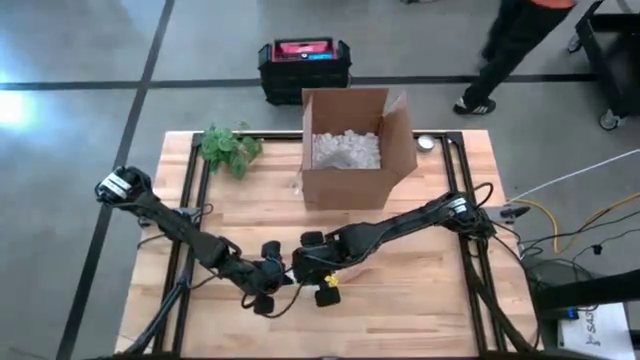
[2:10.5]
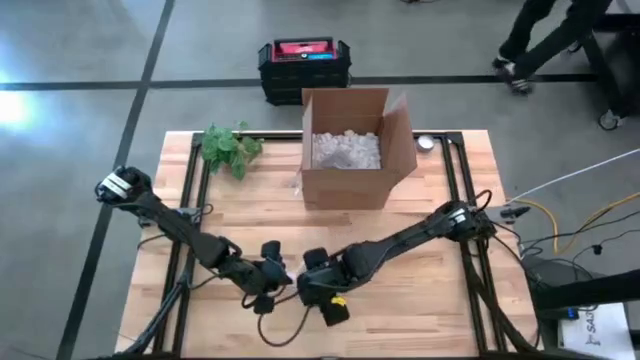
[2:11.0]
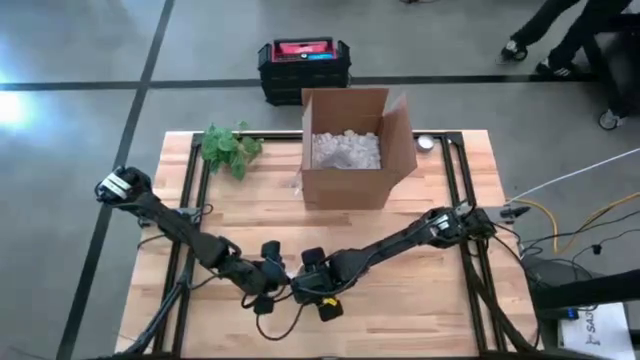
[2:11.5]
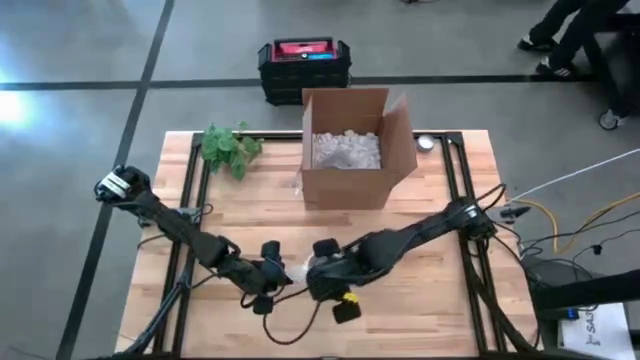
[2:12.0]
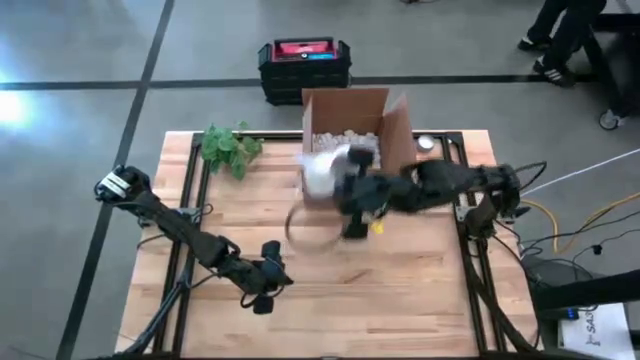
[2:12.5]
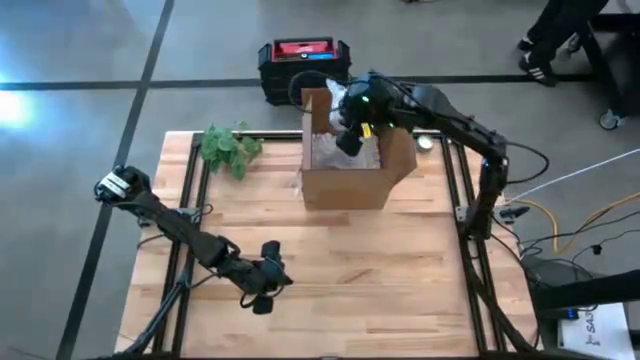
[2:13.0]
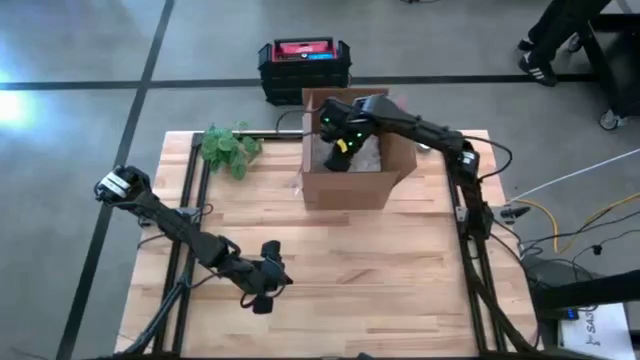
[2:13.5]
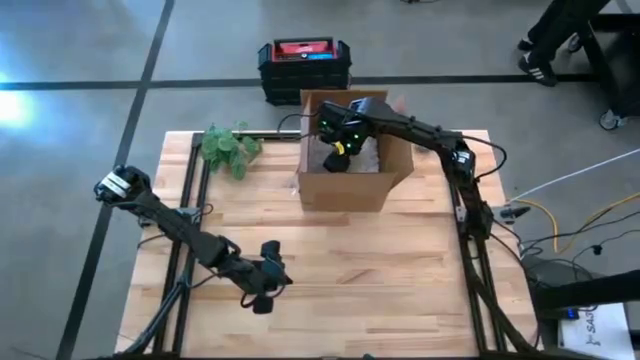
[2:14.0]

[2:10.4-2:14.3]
Task: wrap mug
Put the wrapped yellow mug into the box

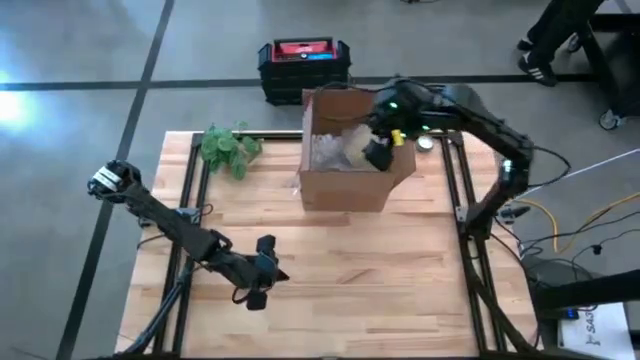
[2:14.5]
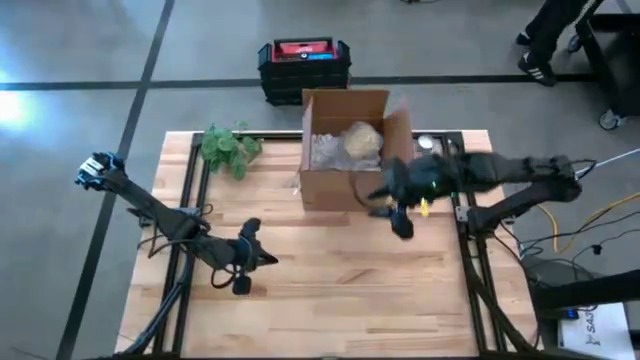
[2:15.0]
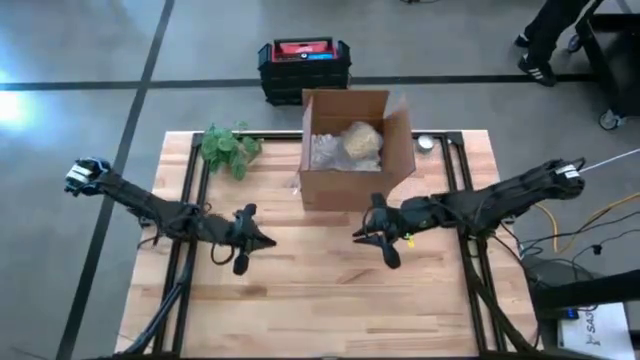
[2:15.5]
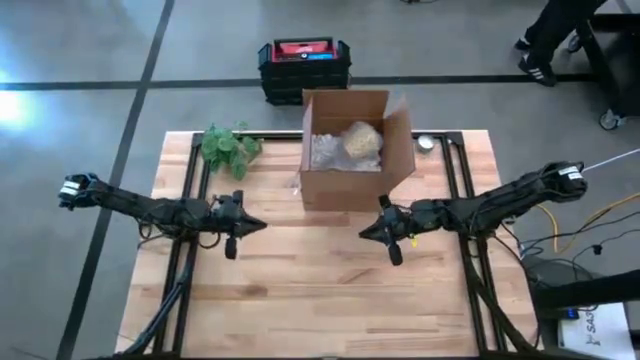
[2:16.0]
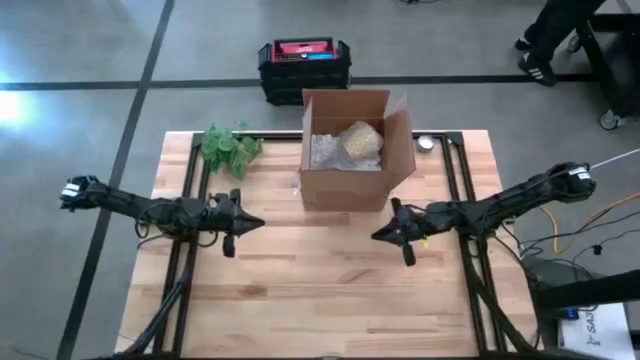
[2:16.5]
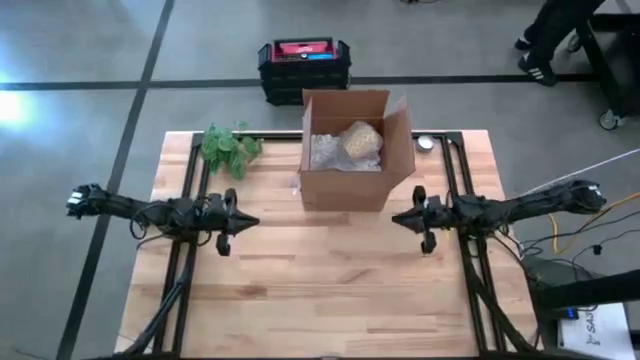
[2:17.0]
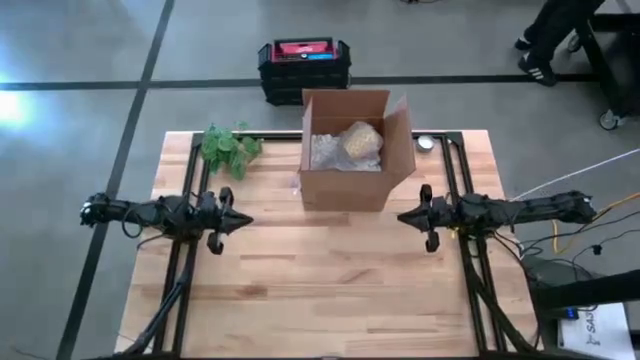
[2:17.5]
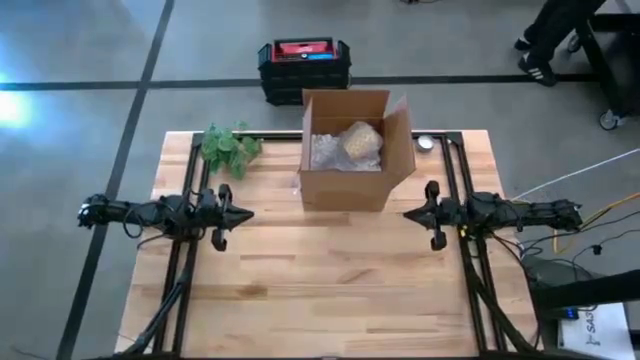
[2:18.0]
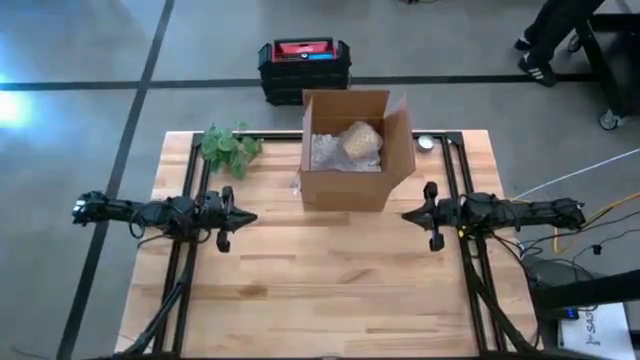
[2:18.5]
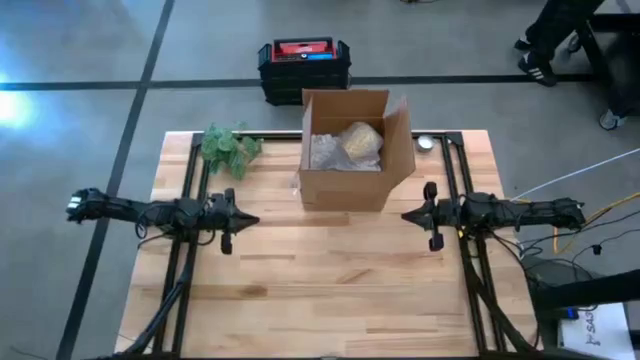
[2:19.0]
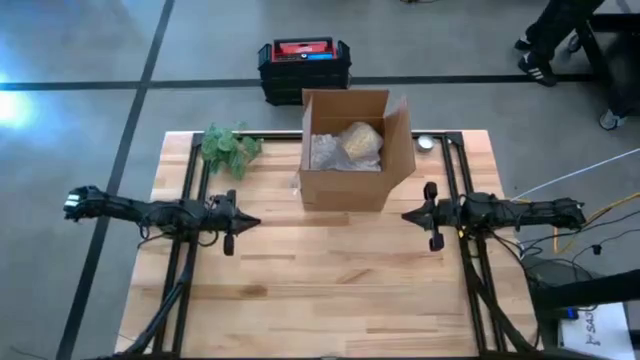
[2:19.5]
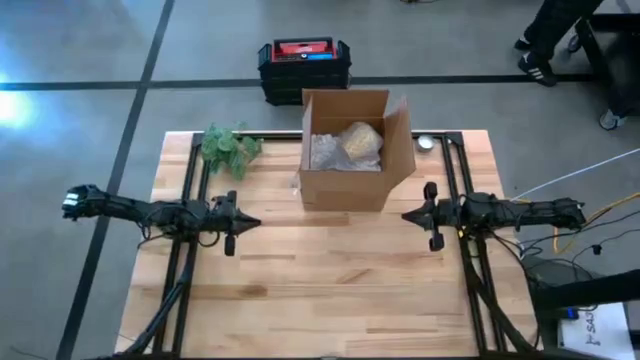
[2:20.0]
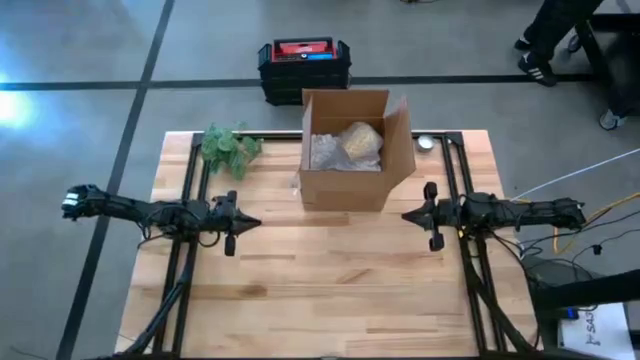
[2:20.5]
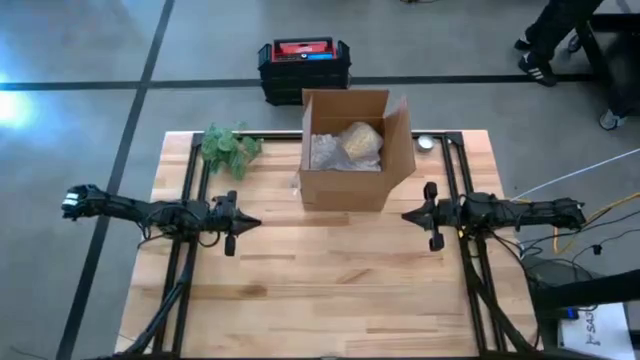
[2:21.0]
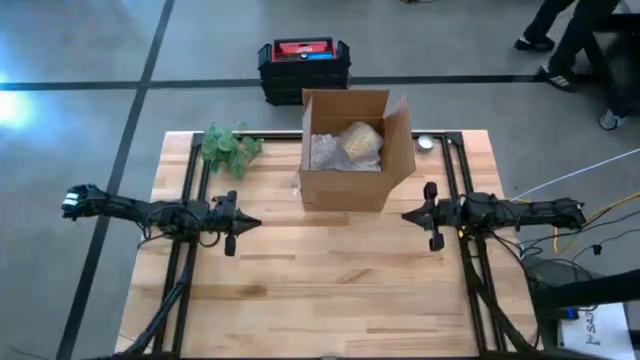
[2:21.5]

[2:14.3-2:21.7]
Return to Home Position

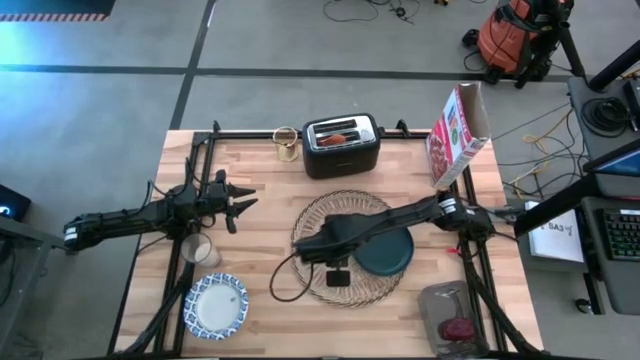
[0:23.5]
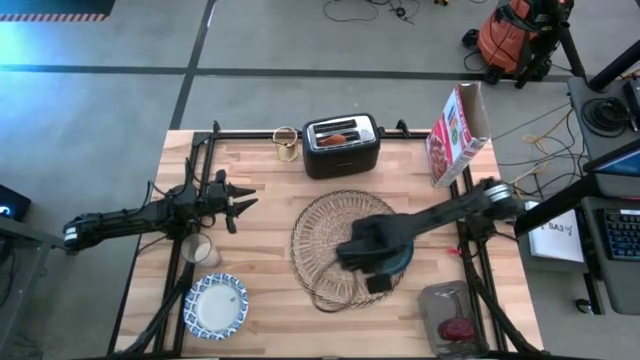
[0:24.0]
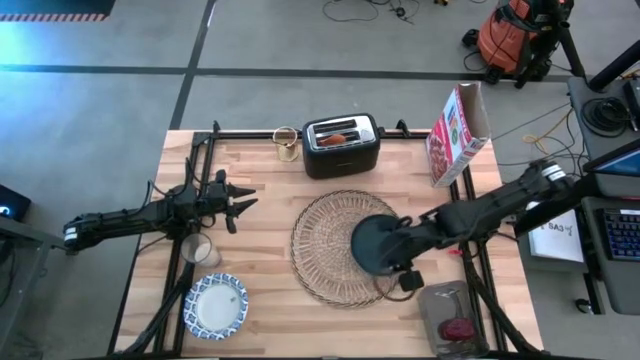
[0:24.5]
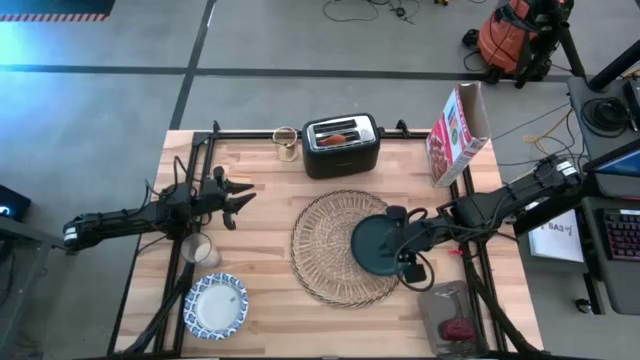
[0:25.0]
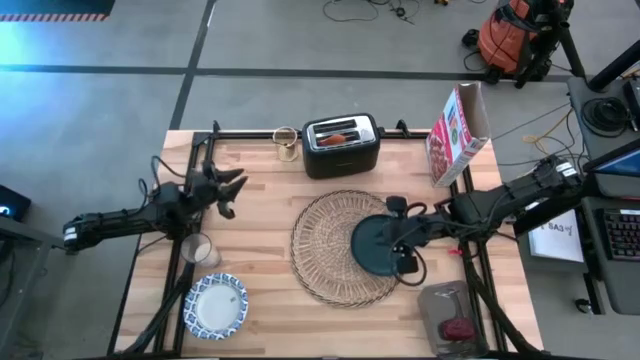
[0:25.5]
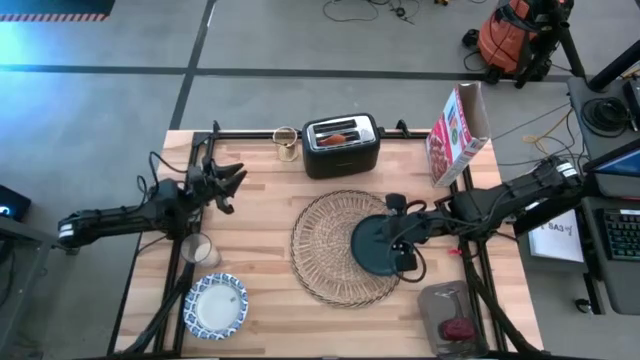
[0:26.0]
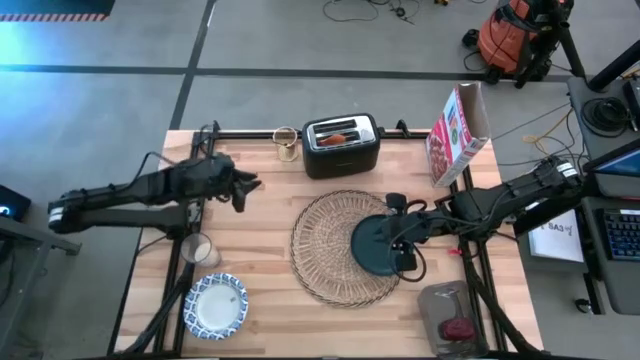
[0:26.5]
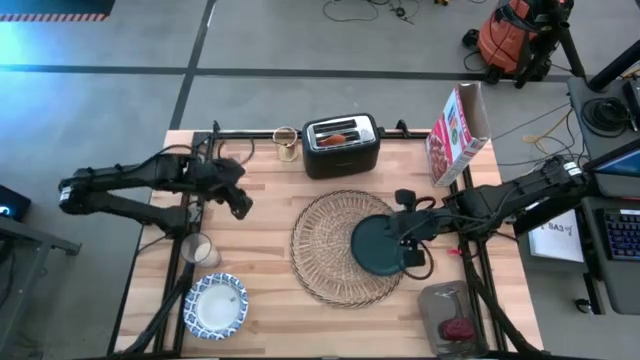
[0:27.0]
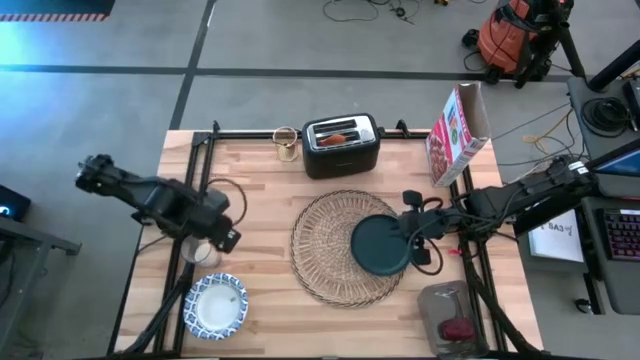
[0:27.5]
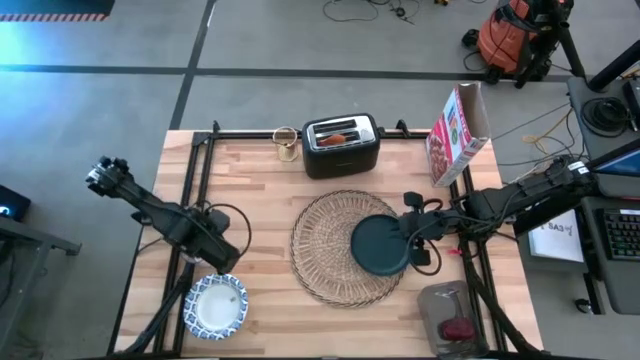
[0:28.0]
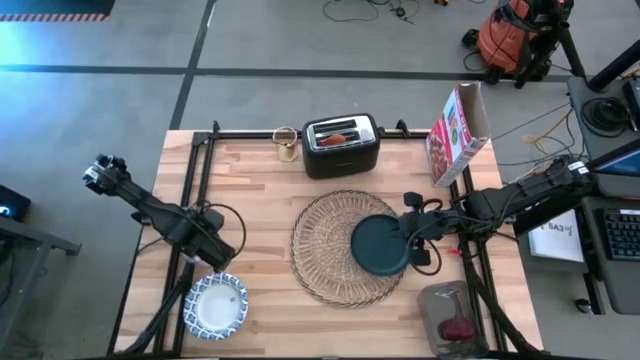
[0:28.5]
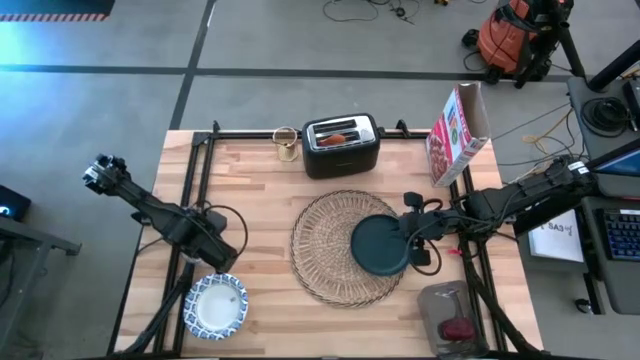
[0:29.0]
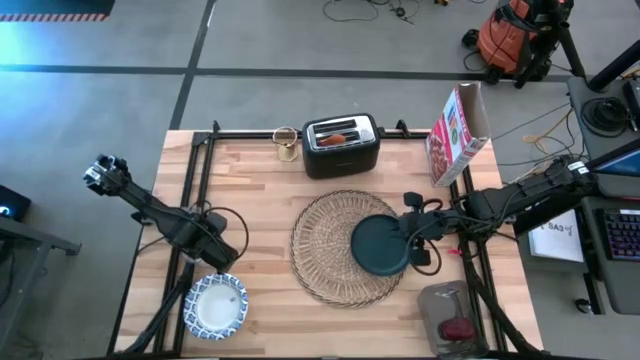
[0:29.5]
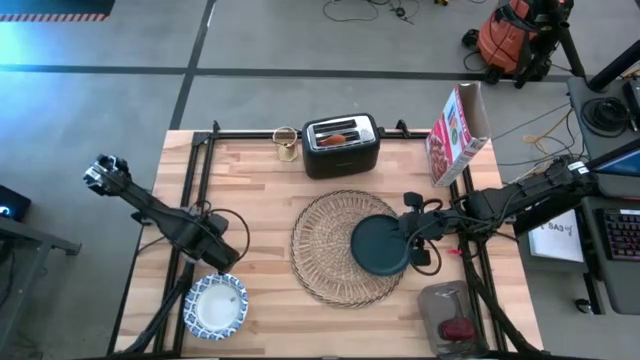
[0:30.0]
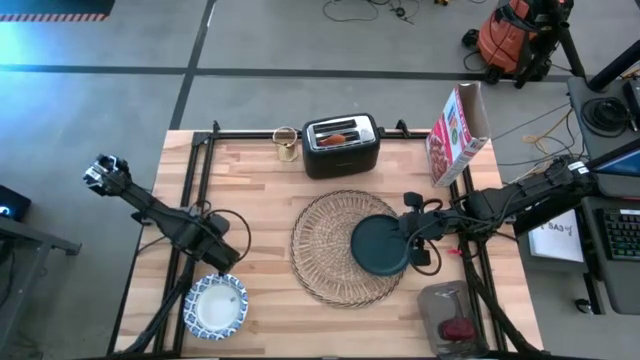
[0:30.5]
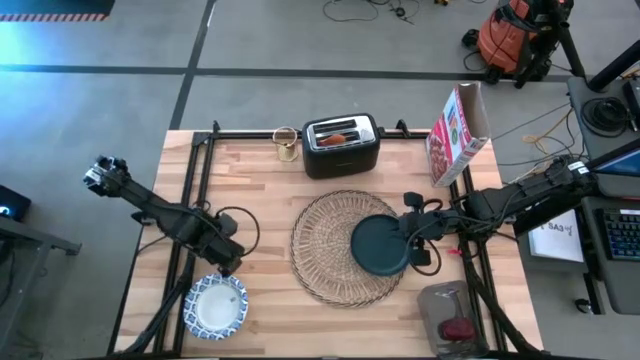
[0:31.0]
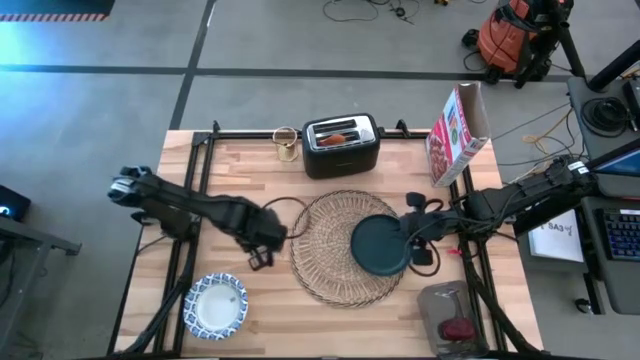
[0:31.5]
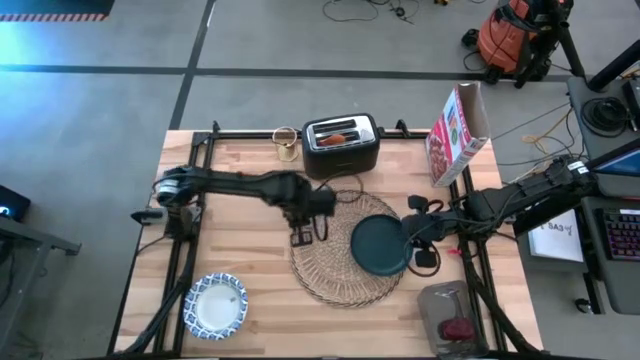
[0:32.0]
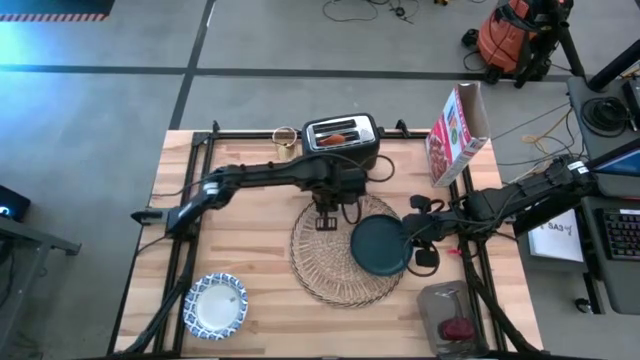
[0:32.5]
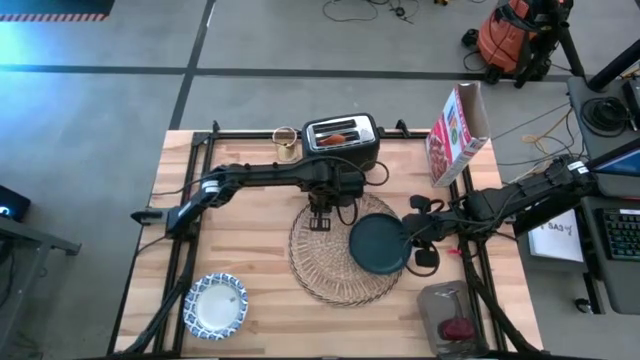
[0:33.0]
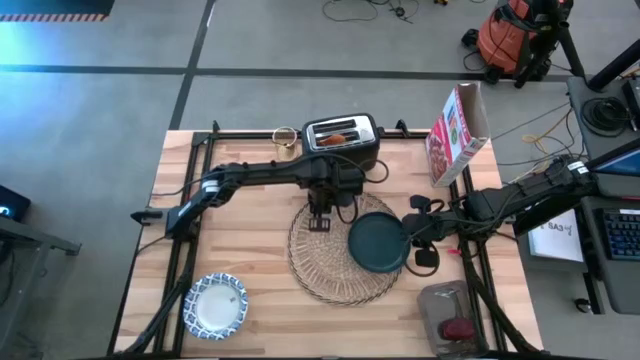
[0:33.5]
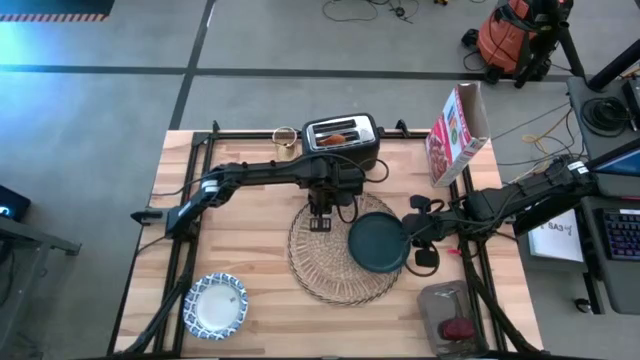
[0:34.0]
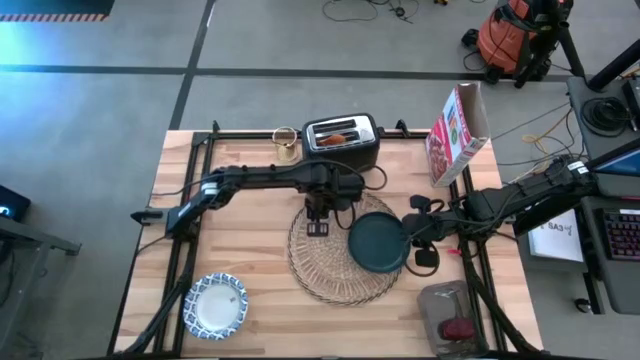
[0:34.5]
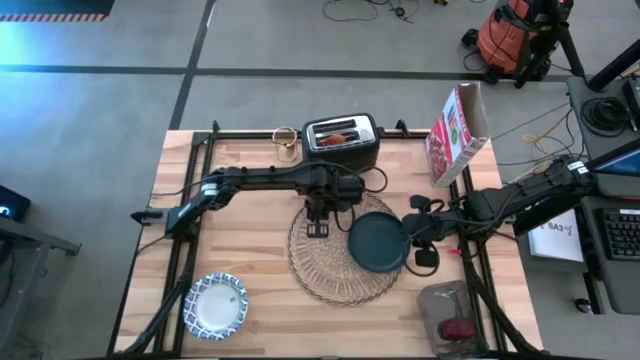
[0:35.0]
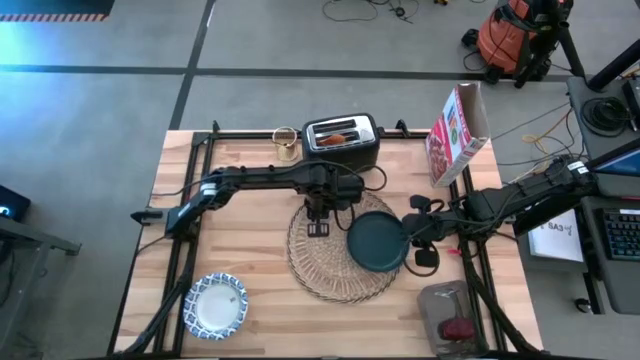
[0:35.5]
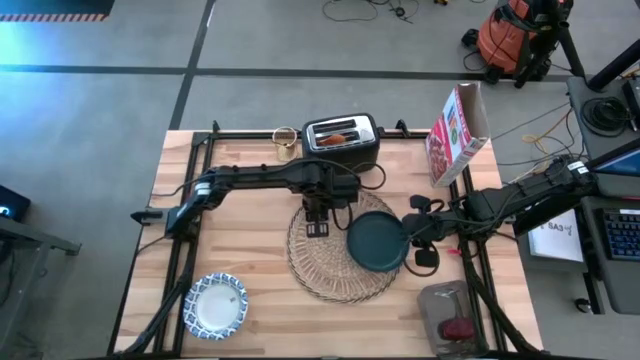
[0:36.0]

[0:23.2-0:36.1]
Task: Arrange a breakfast setting
Put the transparent cup on the top left of the place mat
